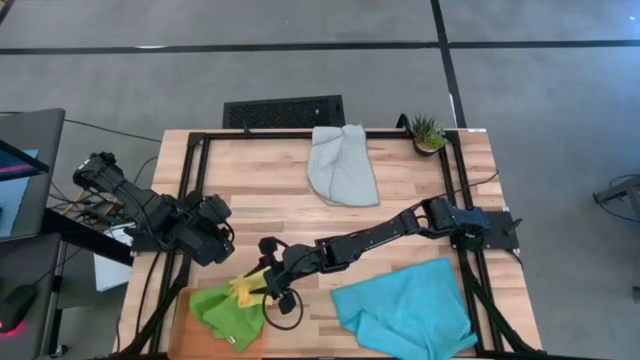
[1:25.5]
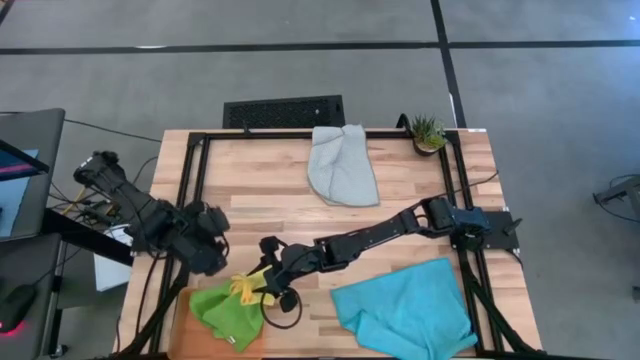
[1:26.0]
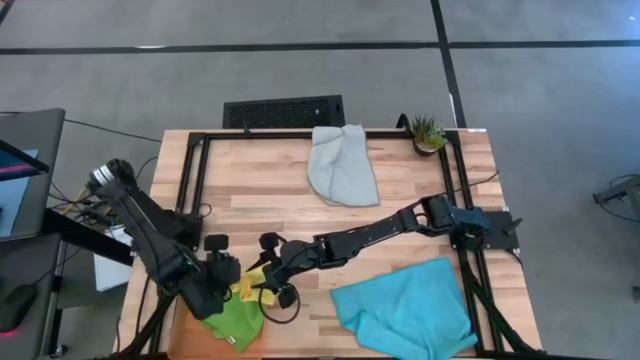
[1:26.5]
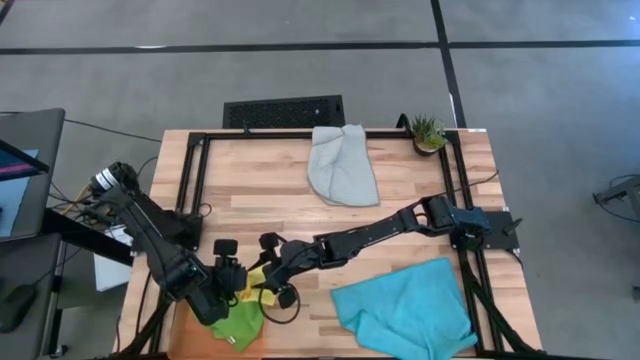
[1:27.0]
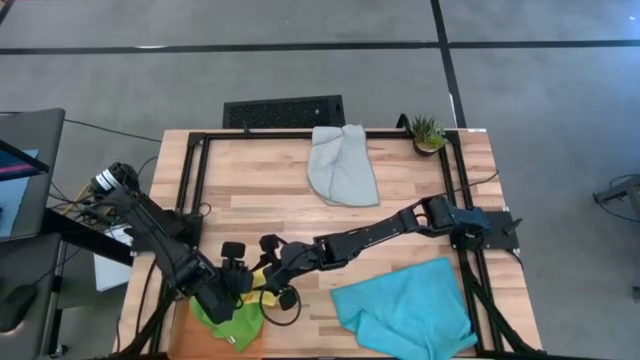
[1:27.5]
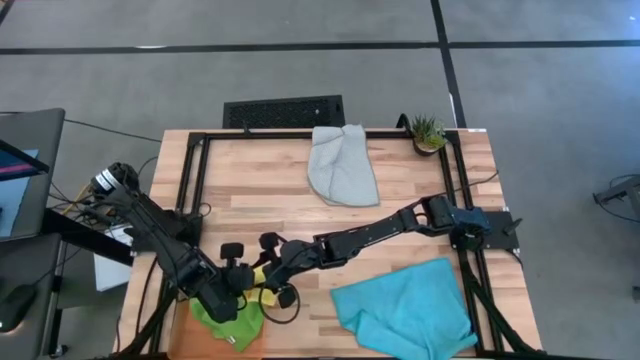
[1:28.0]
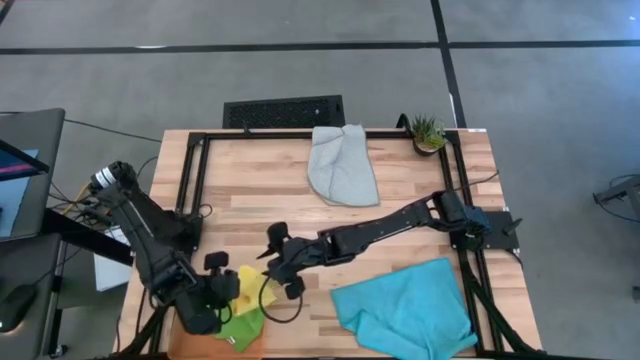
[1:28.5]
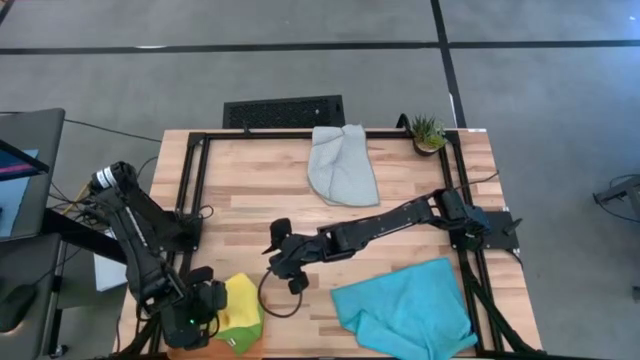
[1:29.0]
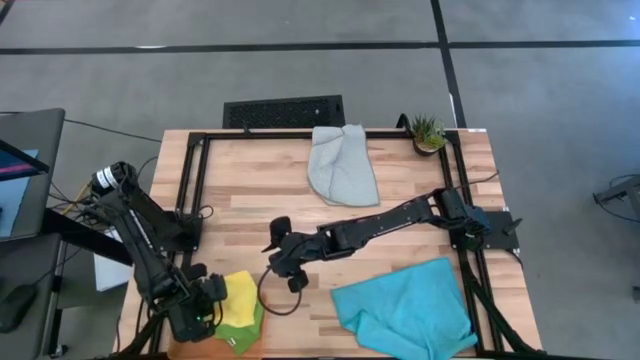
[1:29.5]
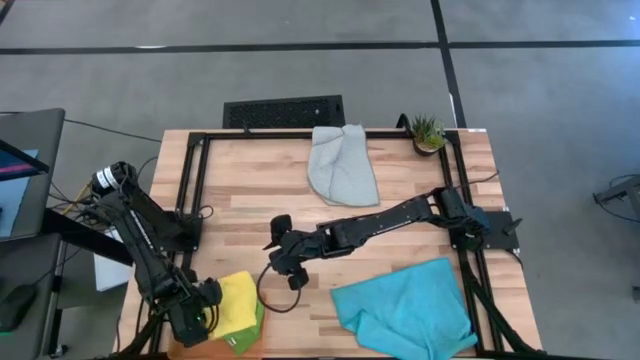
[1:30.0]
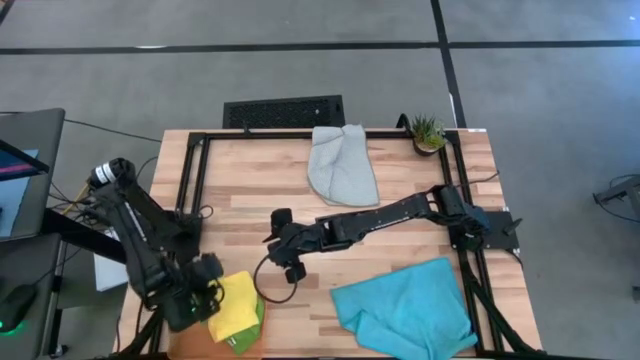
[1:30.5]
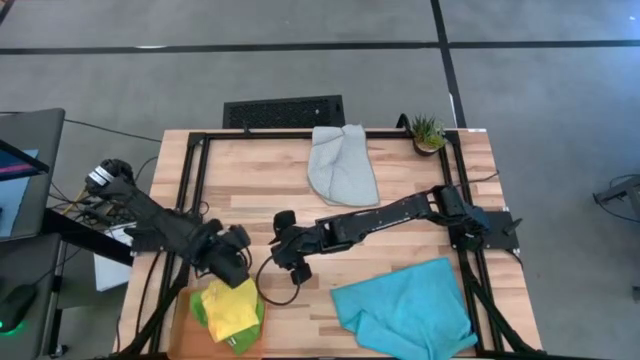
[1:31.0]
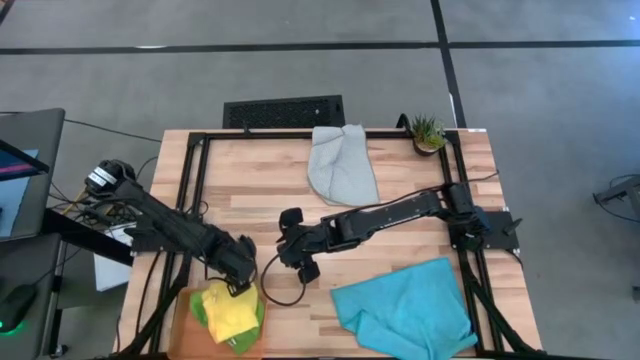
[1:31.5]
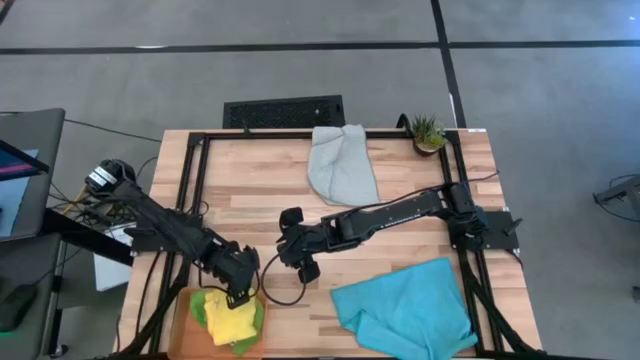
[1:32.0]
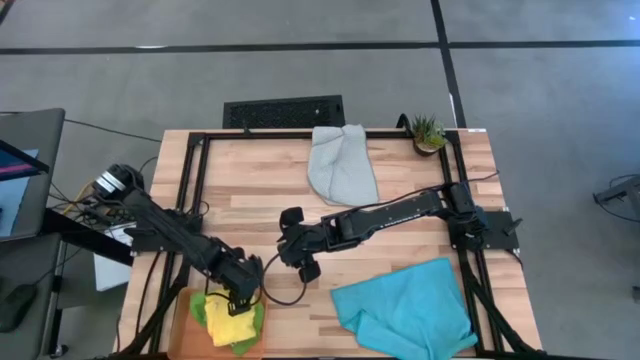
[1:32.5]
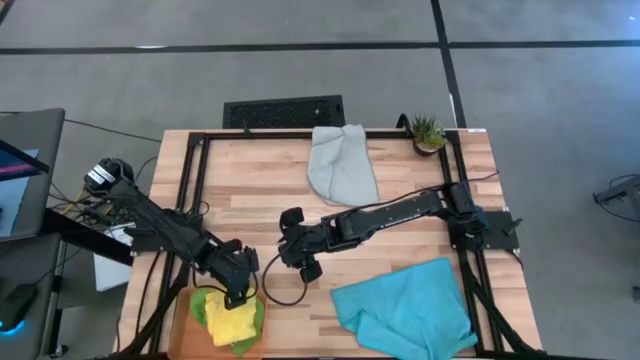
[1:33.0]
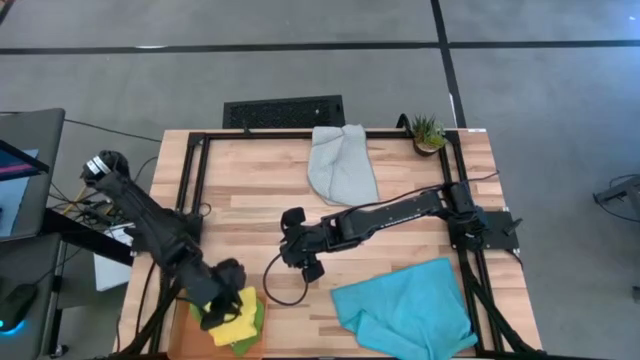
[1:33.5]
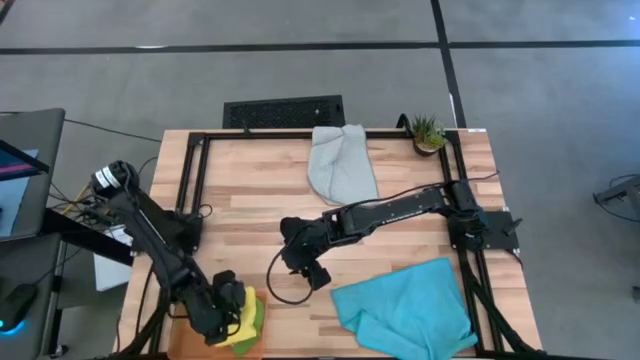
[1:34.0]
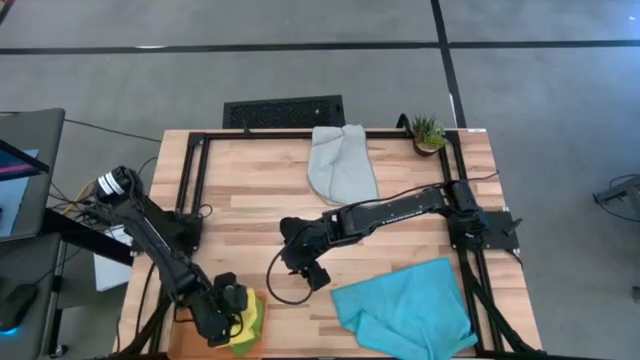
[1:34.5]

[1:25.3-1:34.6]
Task: Fold microfiber towels
Put the folded yellow towel into the orange bin

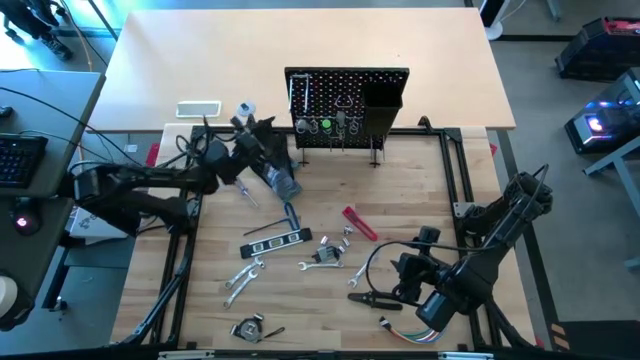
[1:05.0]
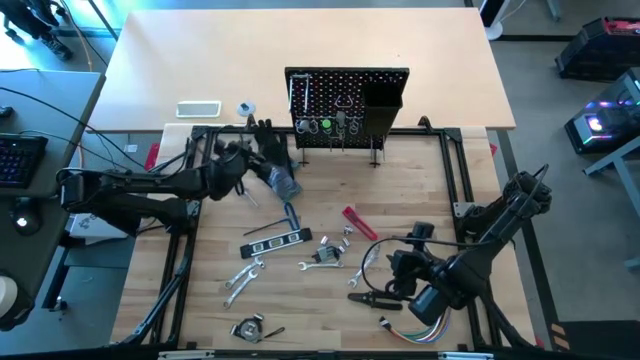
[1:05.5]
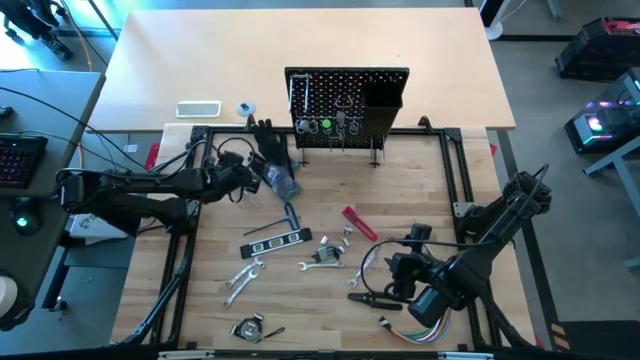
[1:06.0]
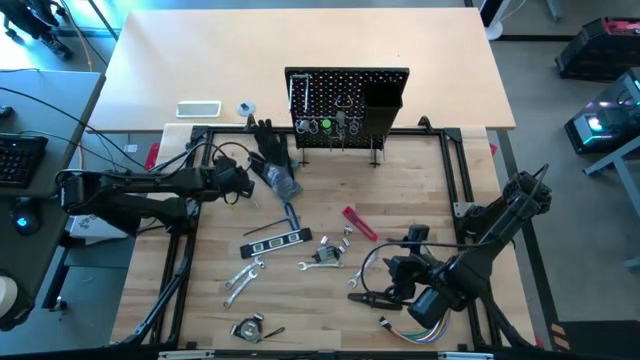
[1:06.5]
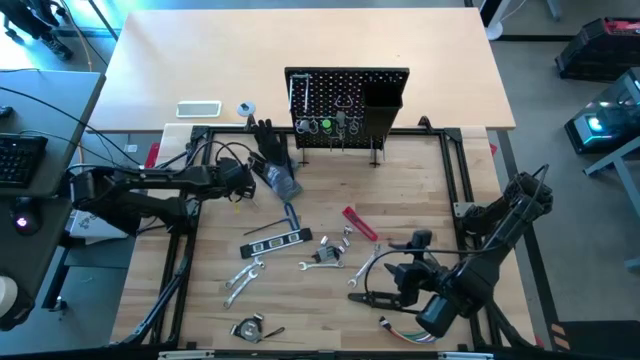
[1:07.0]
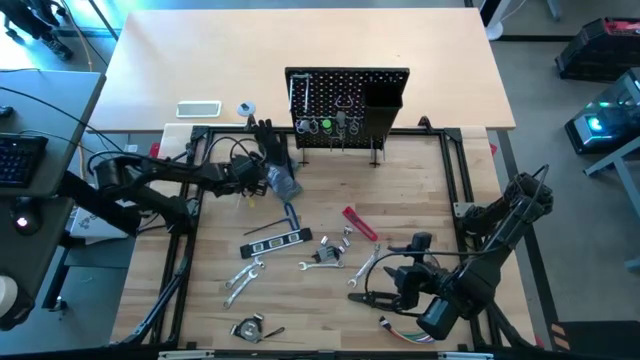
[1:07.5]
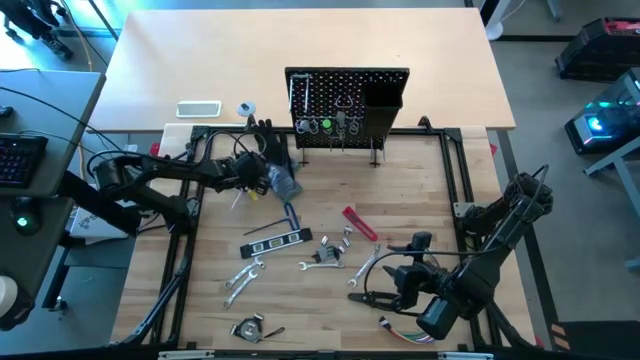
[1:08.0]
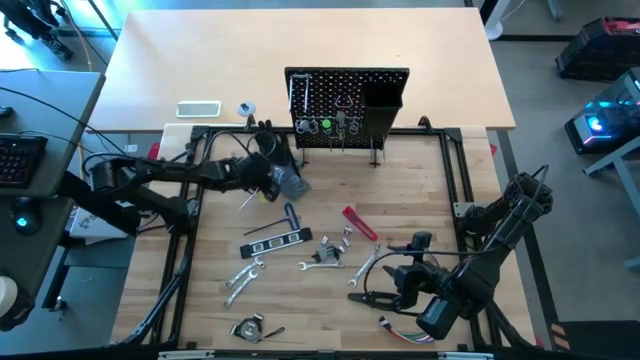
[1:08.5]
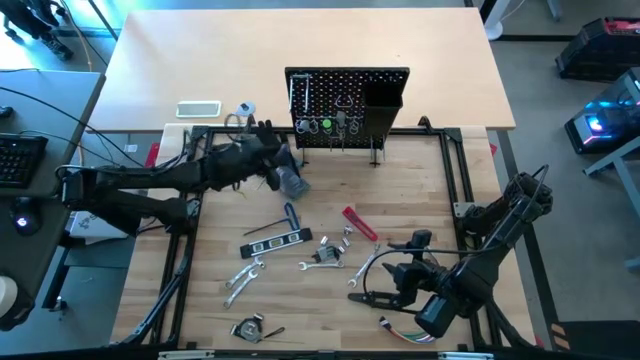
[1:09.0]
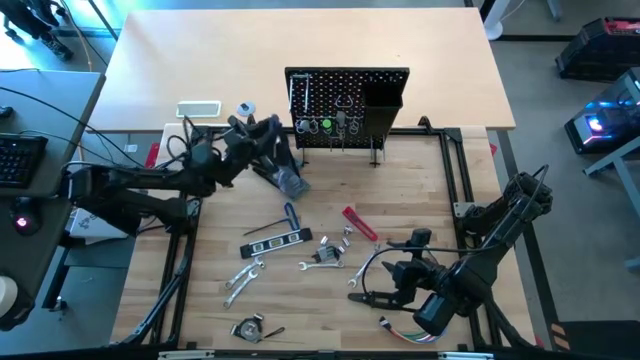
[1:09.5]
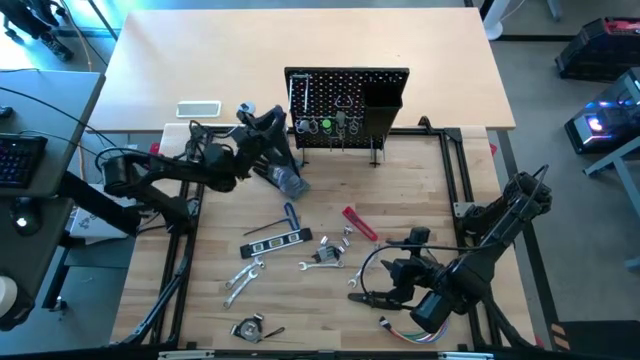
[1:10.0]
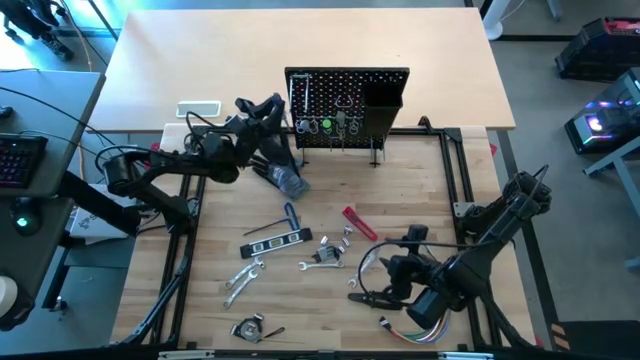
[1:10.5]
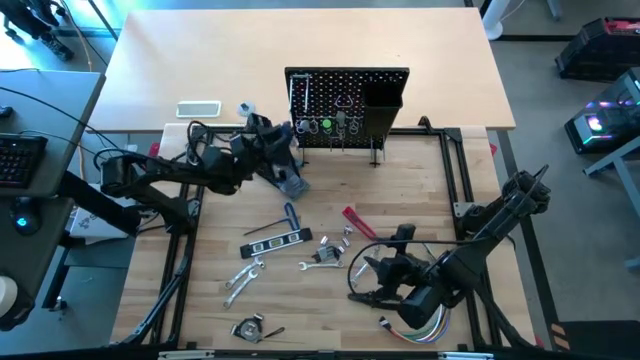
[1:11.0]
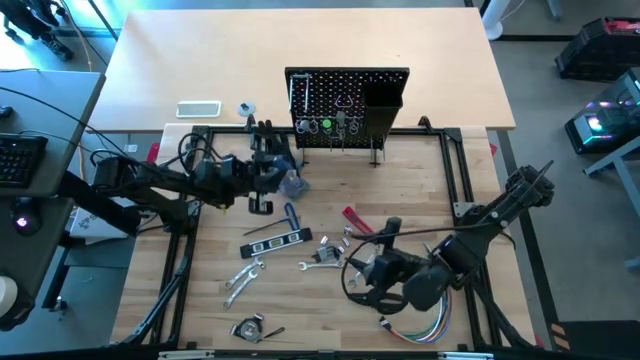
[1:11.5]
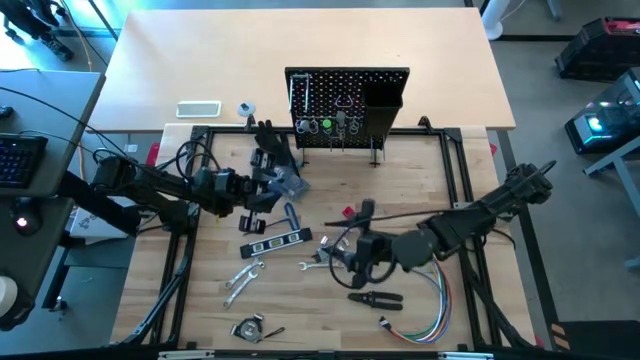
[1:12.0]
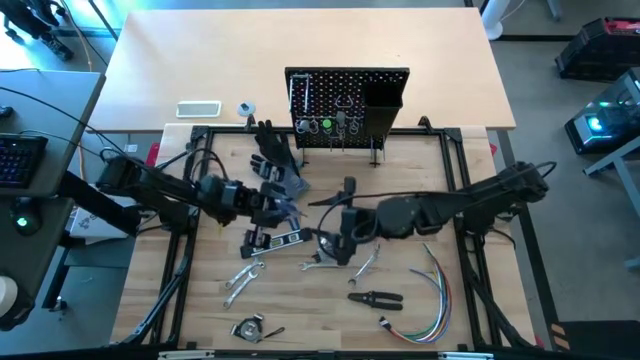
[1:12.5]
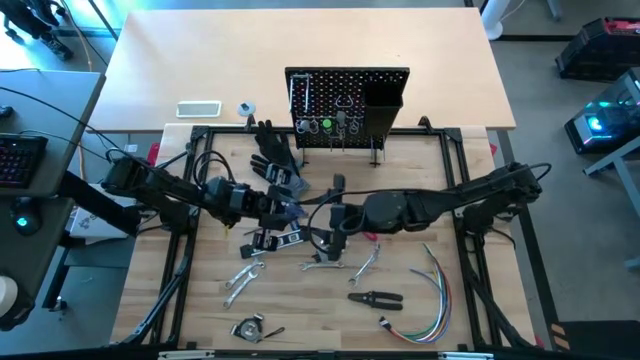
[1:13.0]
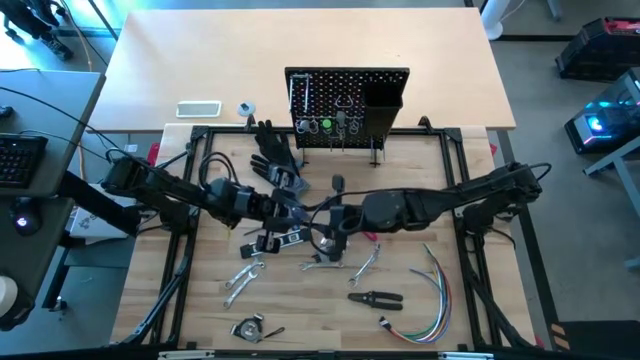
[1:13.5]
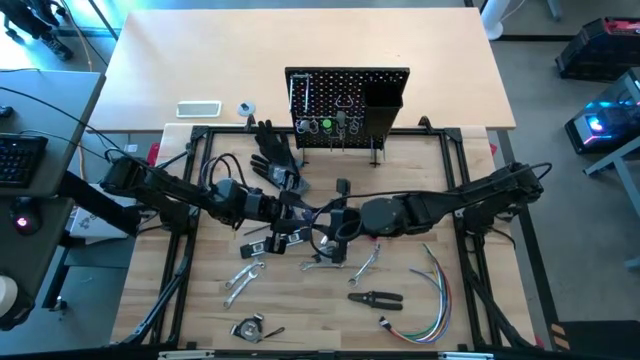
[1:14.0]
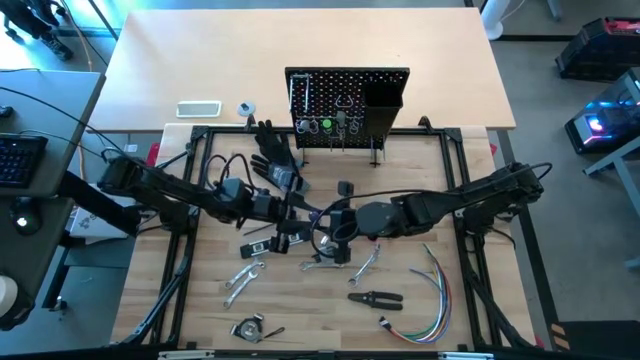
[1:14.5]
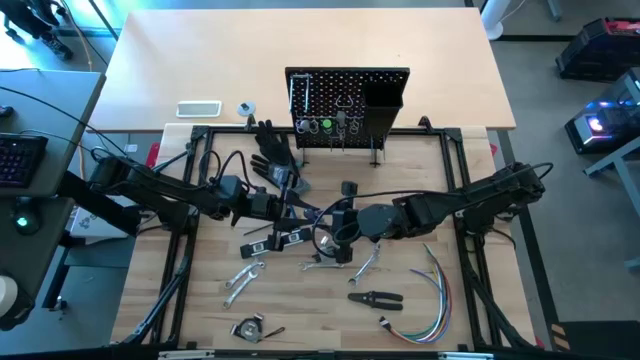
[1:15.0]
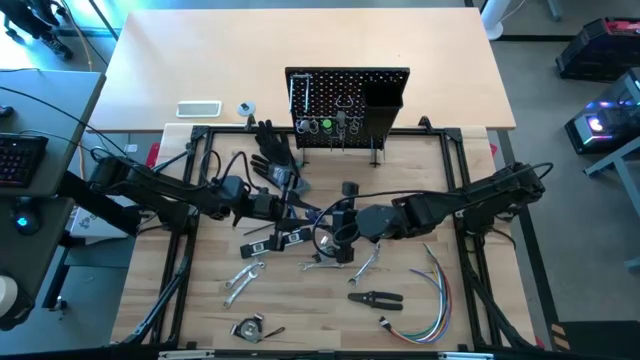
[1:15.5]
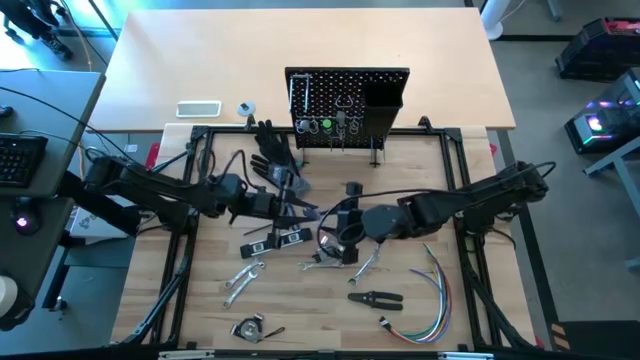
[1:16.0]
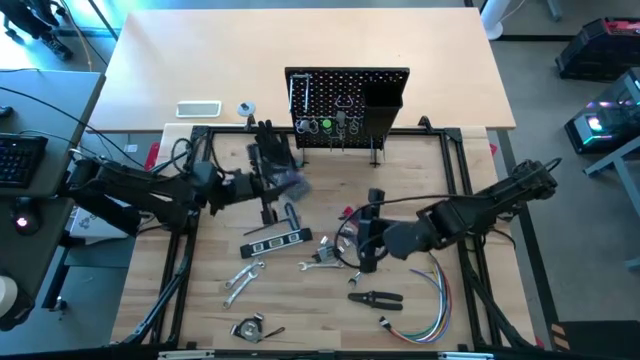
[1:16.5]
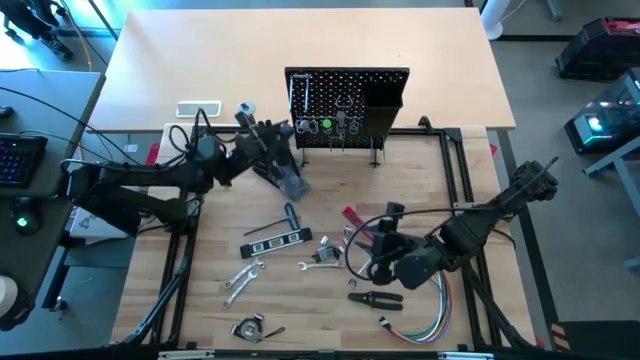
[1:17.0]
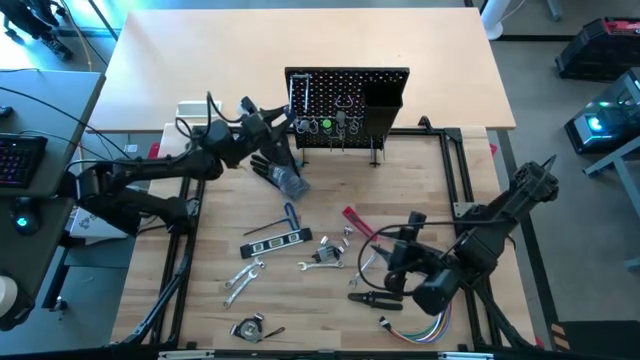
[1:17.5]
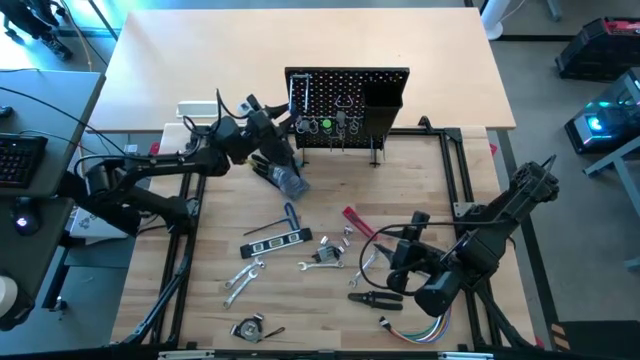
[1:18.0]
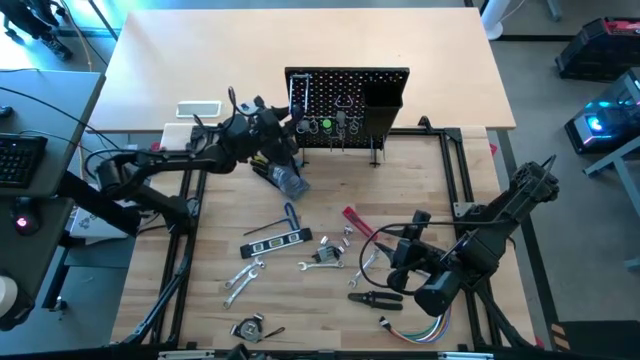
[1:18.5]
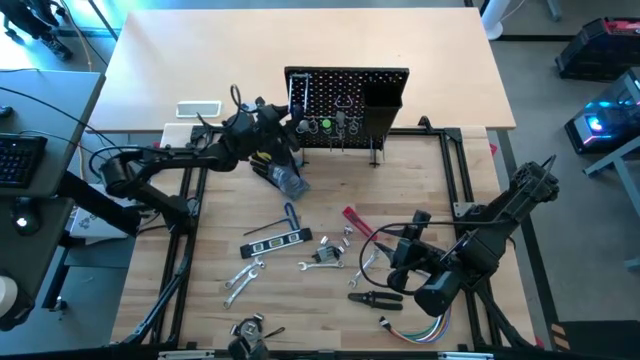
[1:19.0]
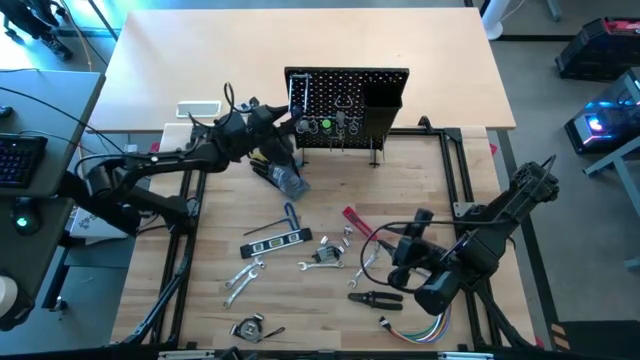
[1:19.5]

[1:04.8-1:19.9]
Task: Hang tools onto peg board
Hang the blue screwdriver on the pegboard
